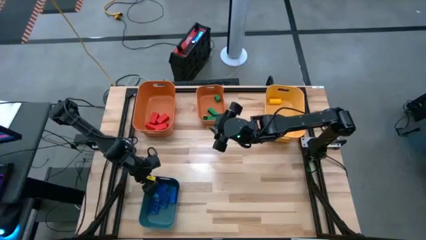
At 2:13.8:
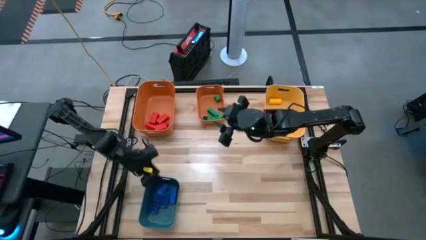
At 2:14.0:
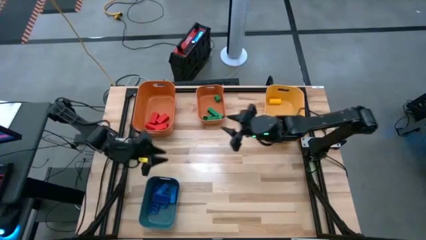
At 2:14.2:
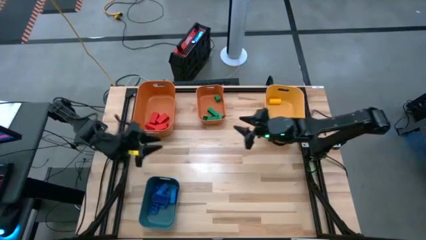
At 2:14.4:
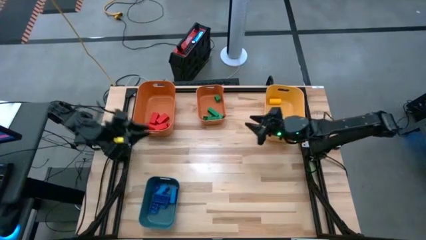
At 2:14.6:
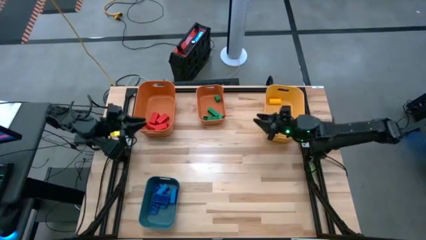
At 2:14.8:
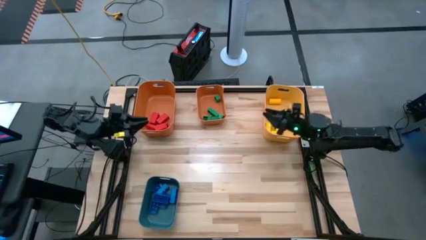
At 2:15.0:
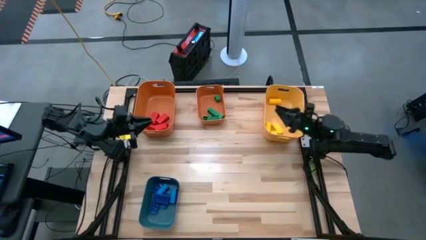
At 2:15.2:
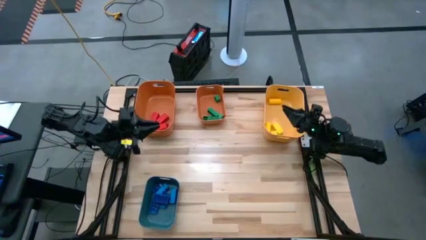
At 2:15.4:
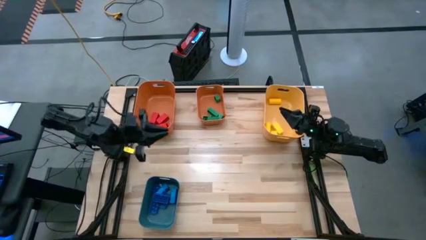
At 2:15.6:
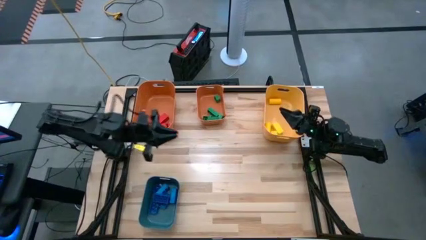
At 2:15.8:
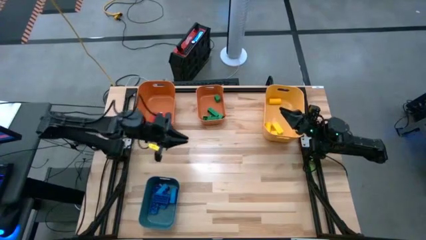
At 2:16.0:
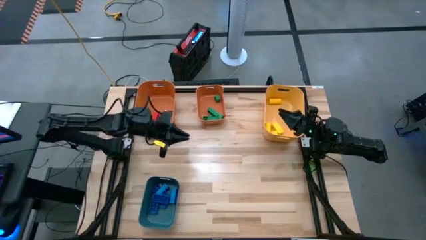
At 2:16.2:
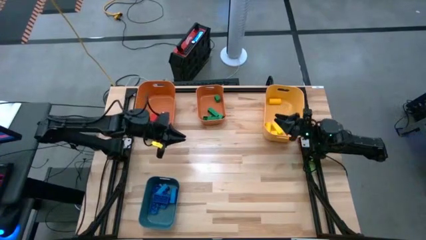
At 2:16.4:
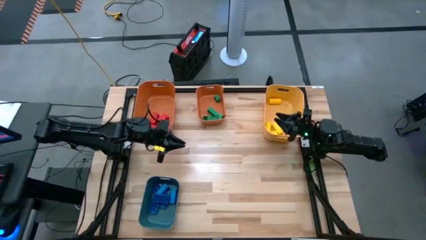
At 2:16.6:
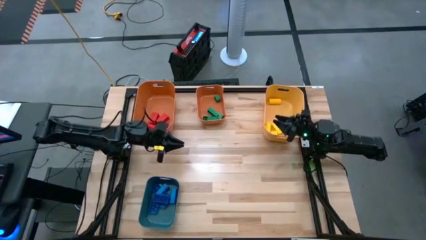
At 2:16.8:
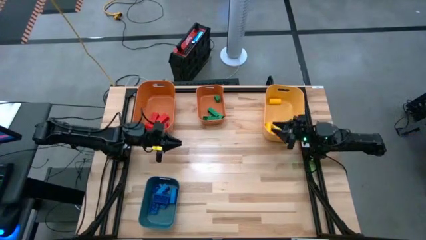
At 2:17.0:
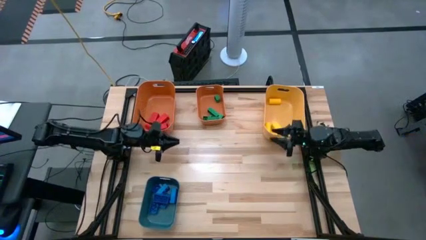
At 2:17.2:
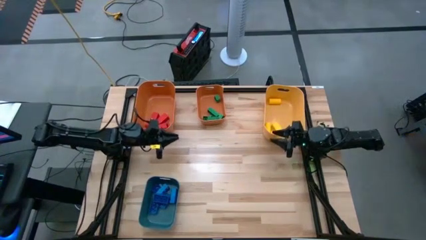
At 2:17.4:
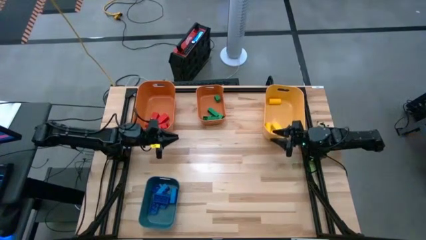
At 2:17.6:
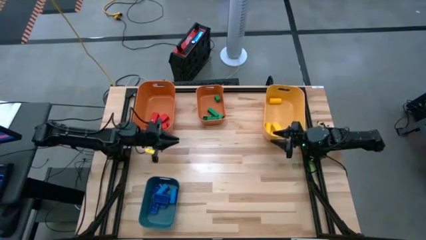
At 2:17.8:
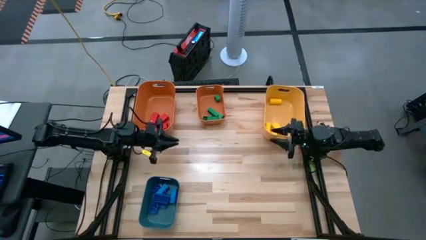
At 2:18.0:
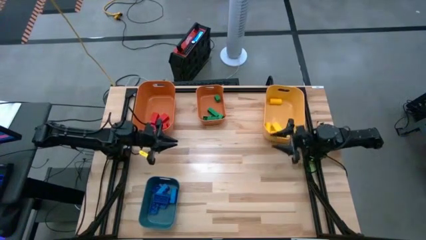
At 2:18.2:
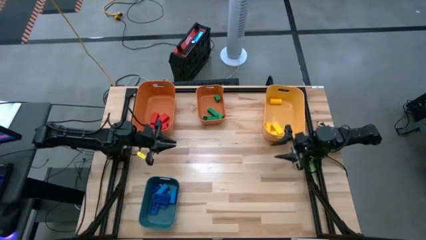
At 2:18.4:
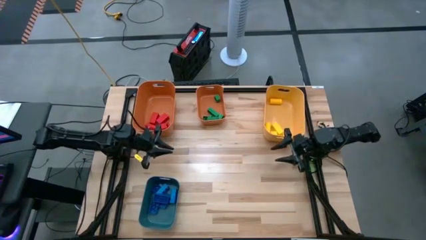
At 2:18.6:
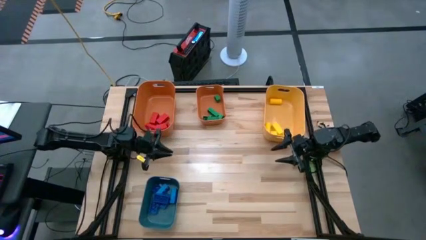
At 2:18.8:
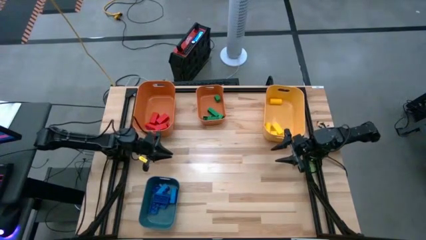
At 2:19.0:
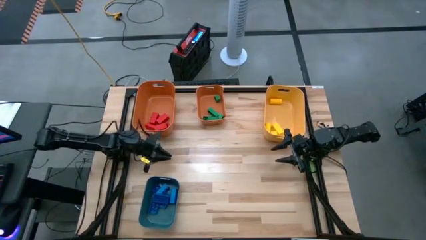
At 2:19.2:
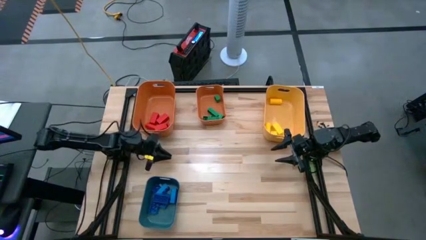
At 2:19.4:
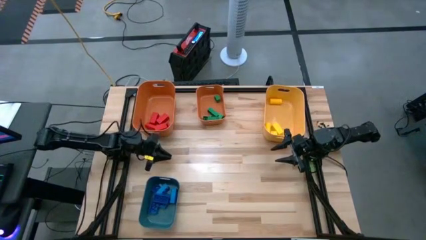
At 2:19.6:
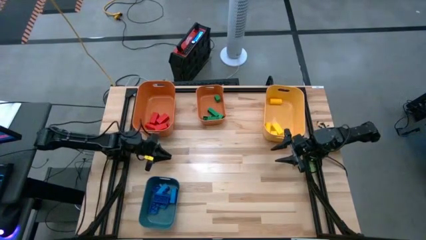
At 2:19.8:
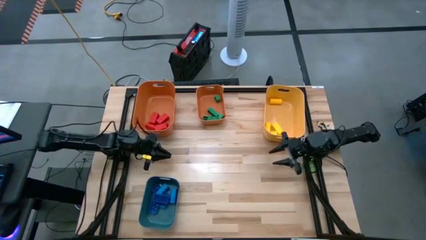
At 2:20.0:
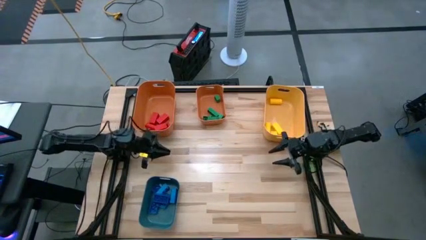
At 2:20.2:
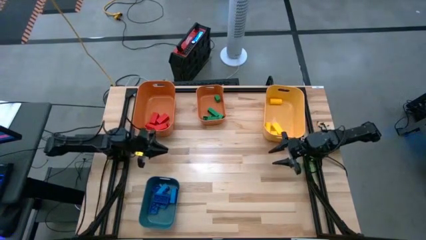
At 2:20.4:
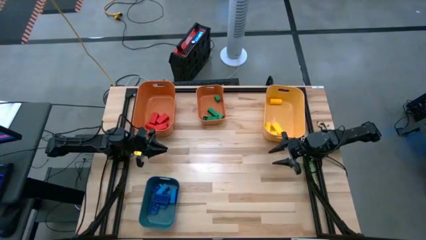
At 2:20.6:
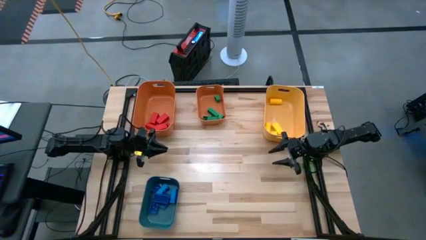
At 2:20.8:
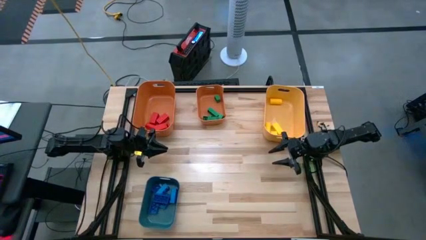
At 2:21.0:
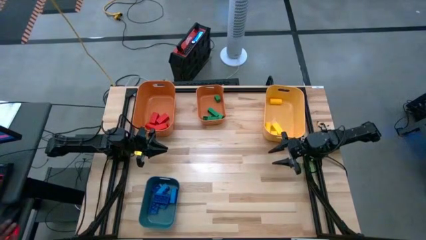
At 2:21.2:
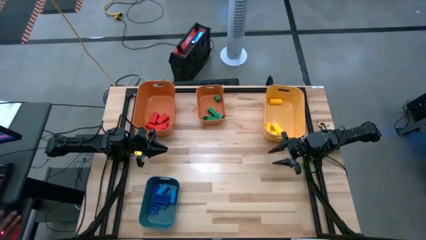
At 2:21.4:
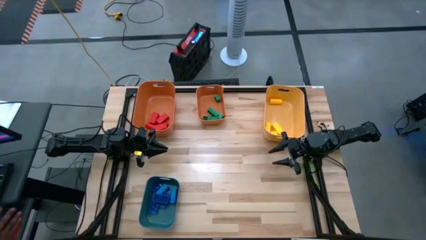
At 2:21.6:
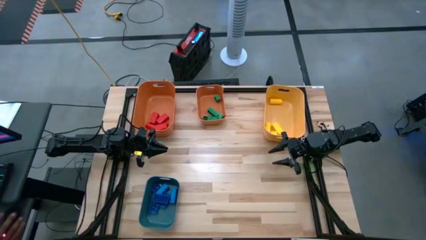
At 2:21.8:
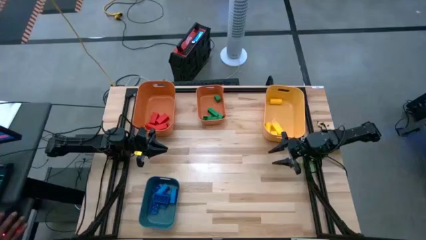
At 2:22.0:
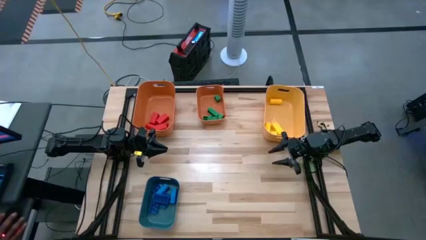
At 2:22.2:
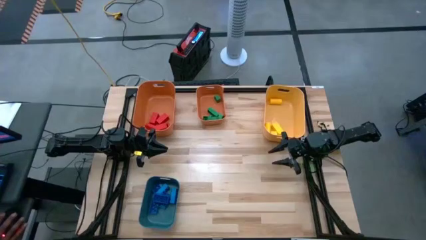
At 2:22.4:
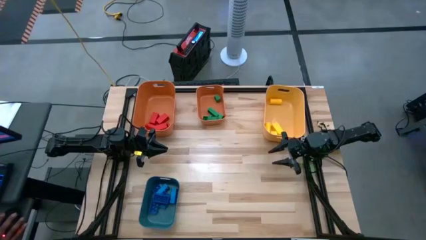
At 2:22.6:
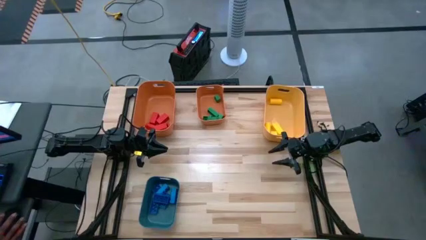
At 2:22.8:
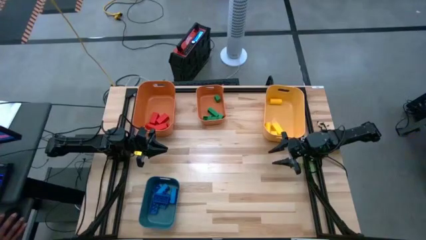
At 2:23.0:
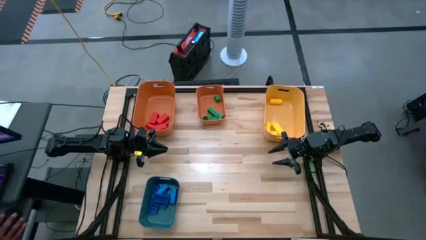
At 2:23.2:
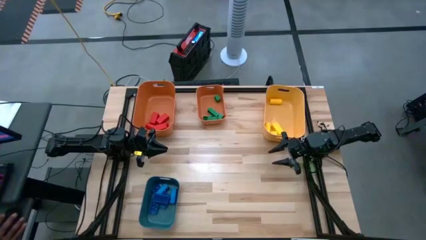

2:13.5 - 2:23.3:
Task: Sort blocks
Return to Home Position
